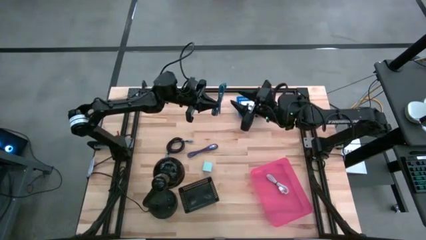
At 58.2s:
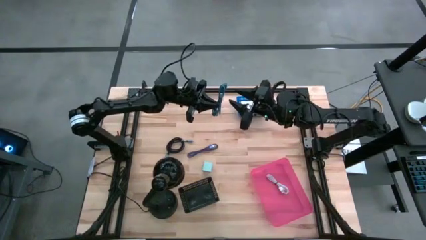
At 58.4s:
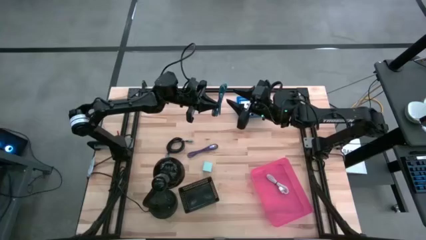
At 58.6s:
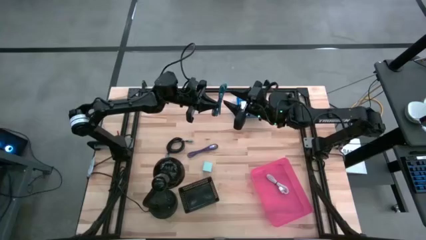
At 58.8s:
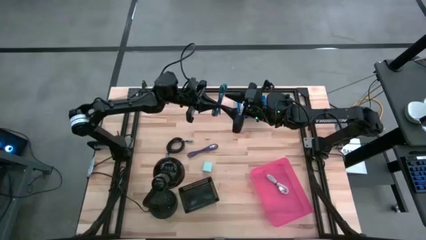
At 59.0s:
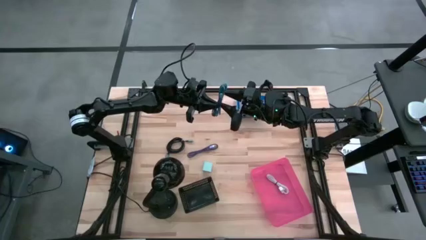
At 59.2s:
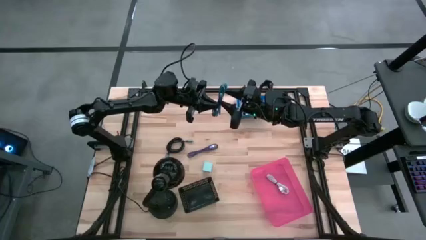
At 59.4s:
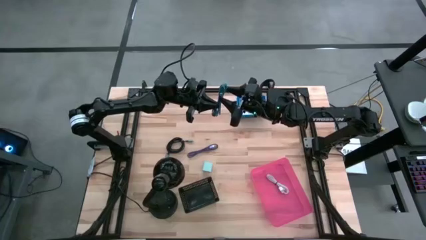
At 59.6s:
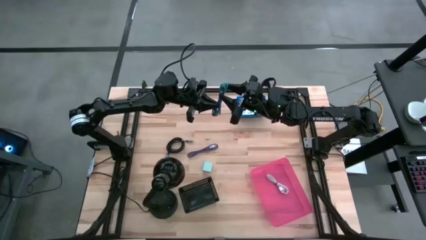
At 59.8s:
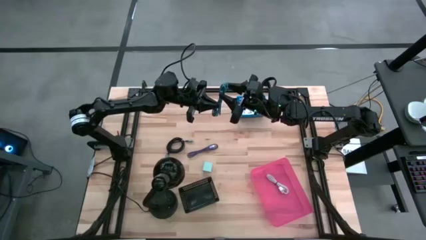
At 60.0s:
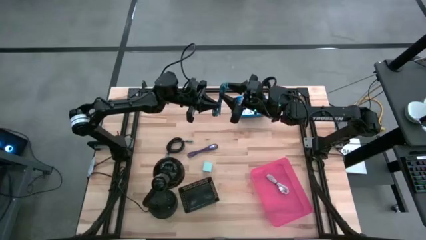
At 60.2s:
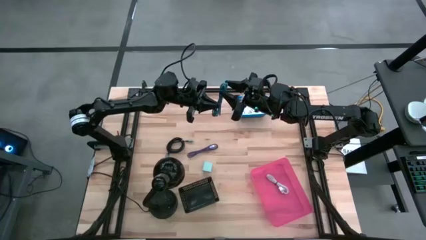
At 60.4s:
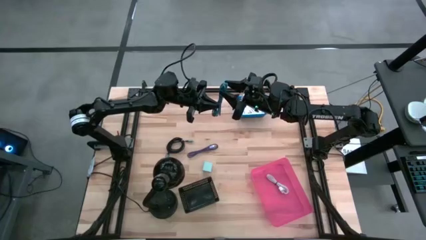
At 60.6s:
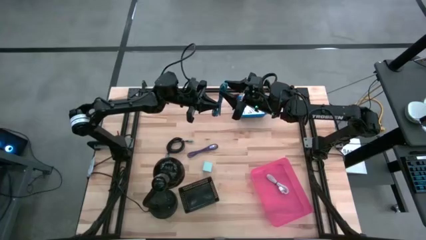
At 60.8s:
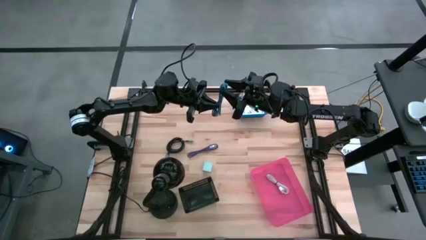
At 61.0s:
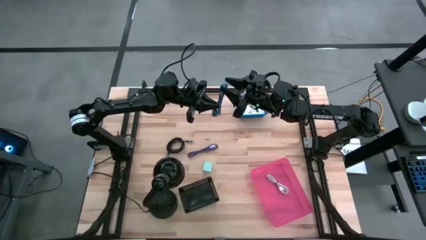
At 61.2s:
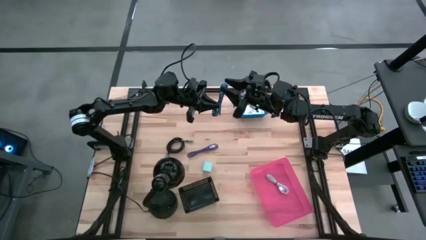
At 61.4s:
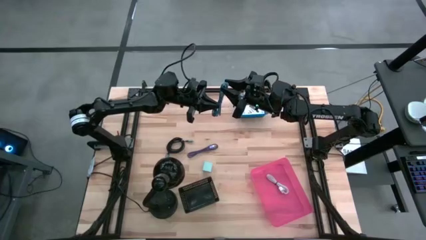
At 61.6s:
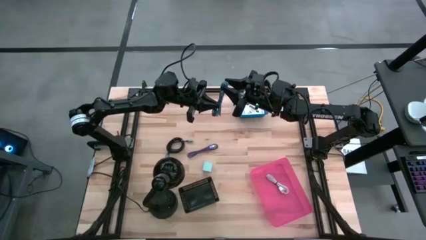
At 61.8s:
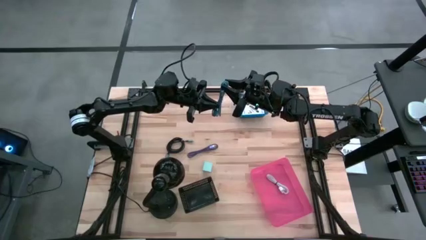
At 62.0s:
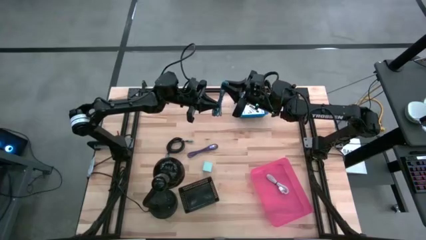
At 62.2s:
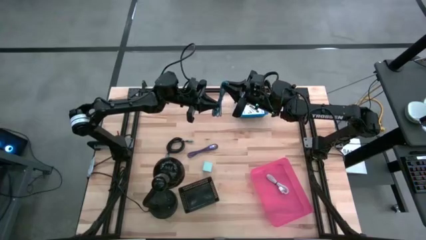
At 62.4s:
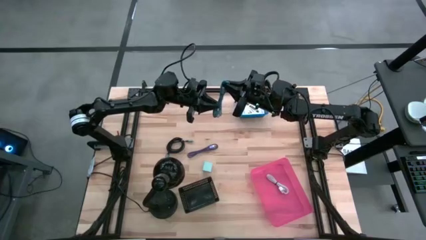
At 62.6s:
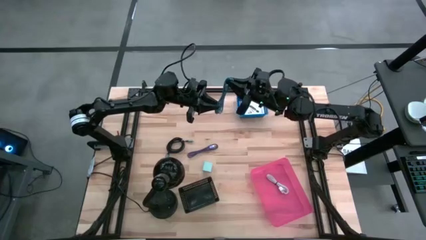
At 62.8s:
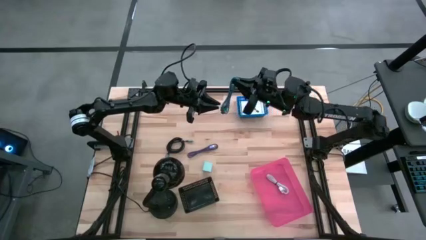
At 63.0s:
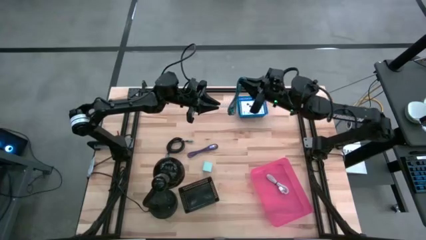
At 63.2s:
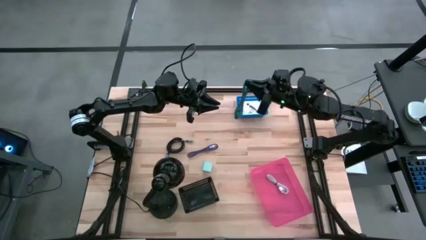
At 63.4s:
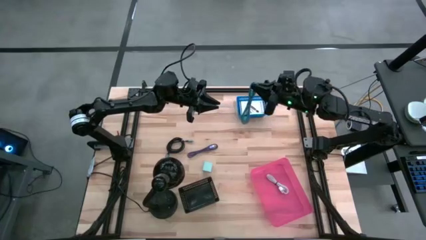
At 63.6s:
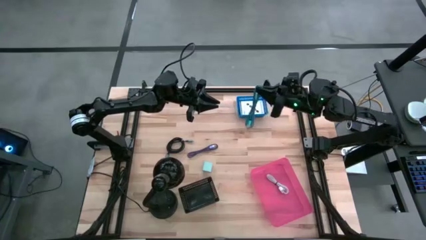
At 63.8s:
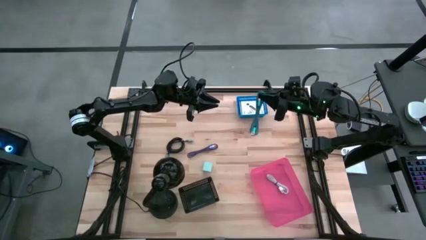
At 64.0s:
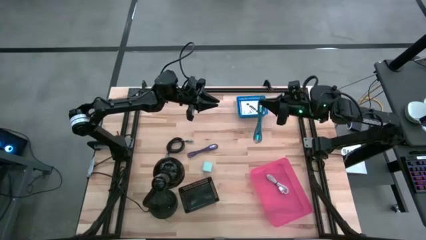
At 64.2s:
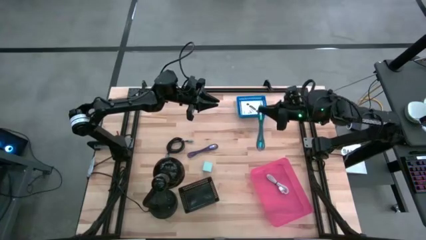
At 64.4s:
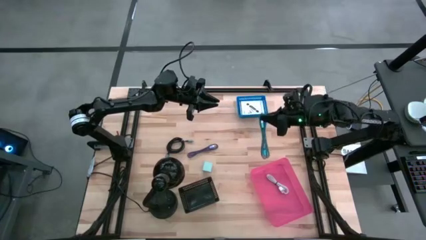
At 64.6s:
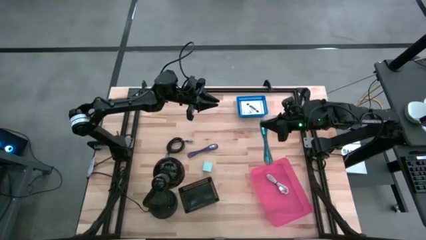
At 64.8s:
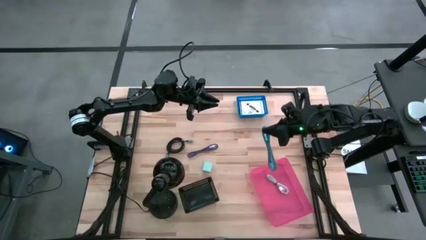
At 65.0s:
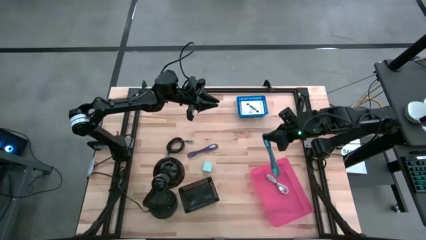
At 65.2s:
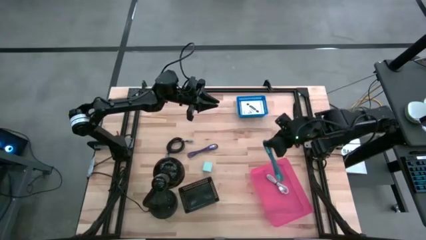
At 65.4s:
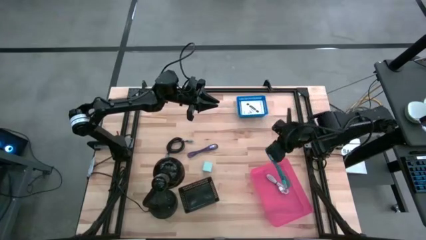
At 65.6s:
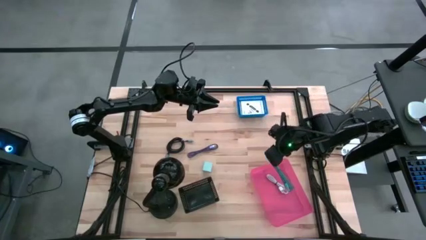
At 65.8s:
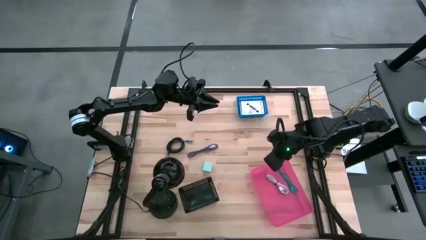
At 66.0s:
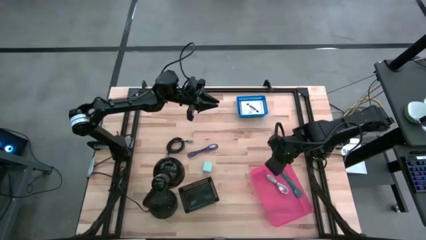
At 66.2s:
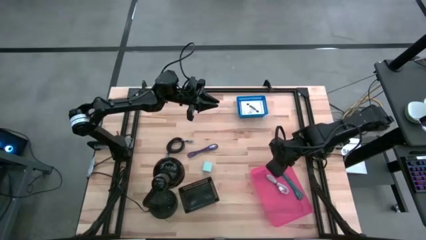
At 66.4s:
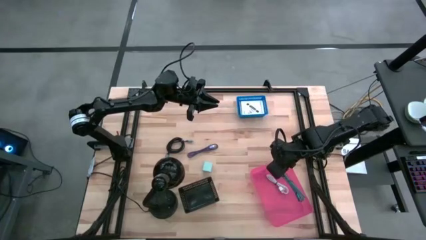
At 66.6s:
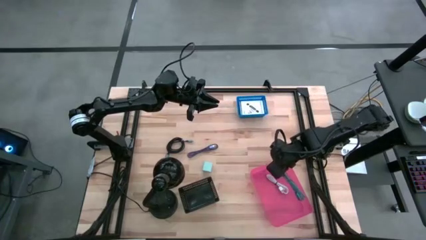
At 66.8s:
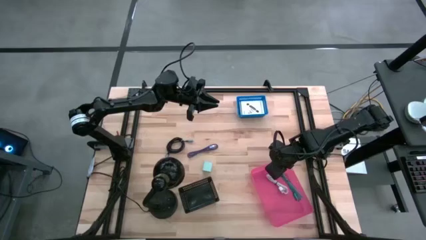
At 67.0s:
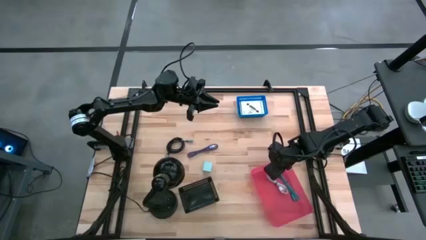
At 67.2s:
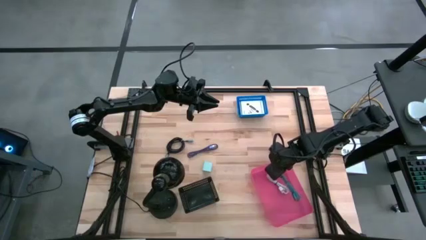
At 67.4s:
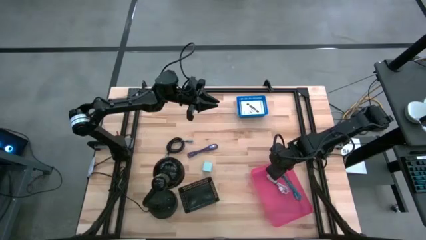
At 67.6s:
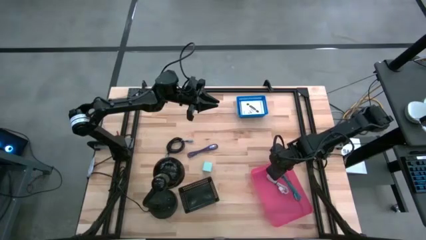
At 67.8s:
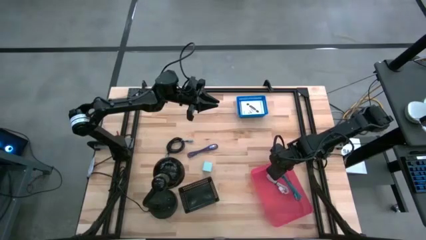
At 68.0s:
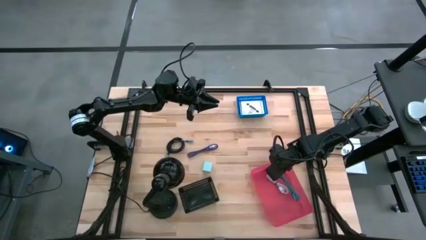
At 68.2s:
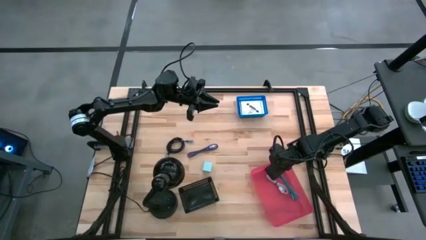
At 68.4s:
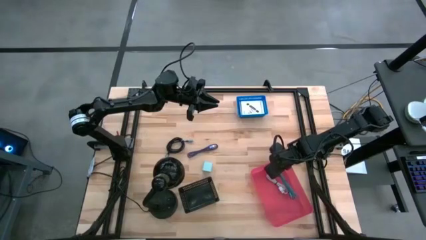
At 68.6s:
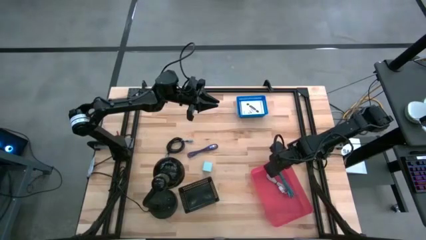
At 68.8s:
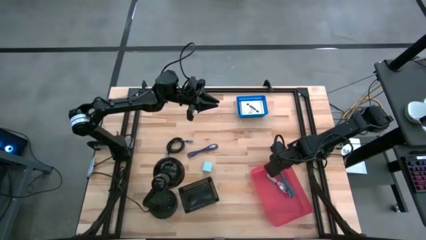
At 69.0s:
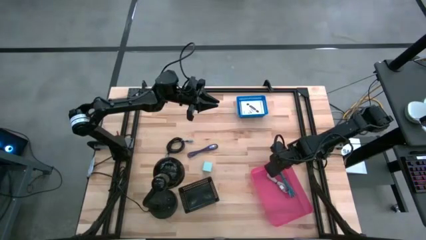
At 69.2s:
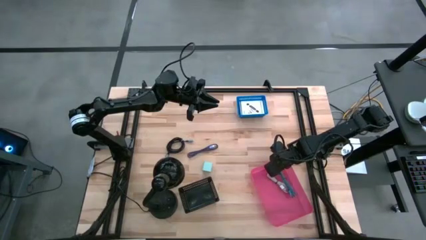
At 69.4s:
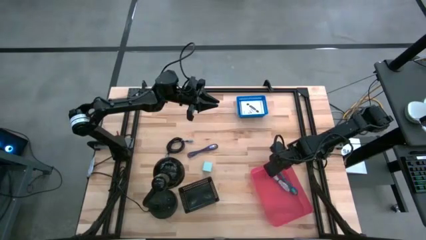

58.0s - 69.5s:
Task: Pick and place items into bin
Put the blue charger cable into the pink bin
